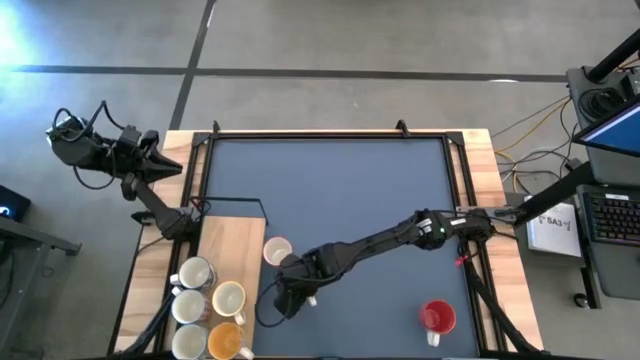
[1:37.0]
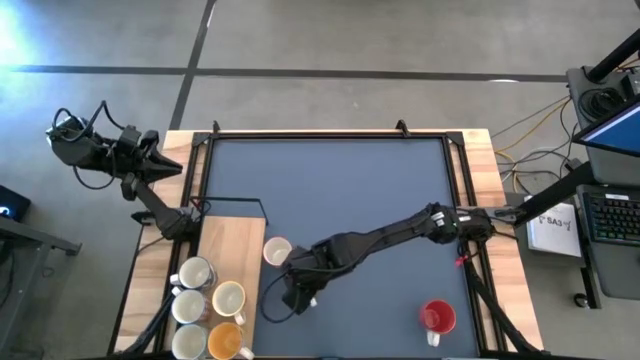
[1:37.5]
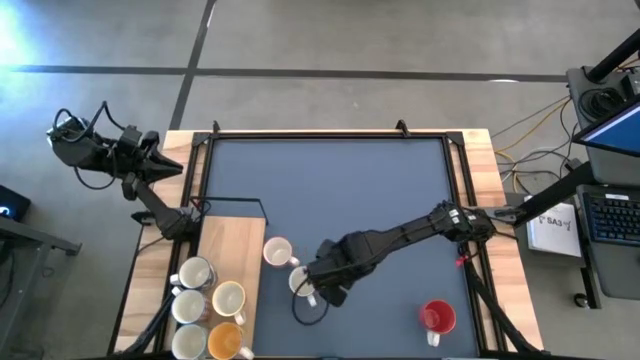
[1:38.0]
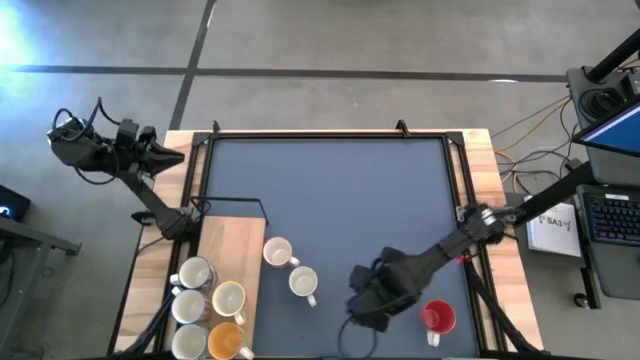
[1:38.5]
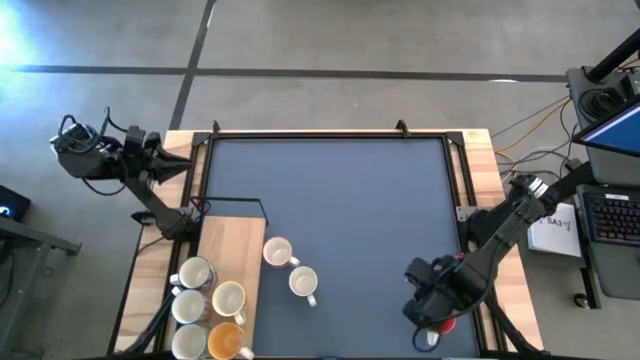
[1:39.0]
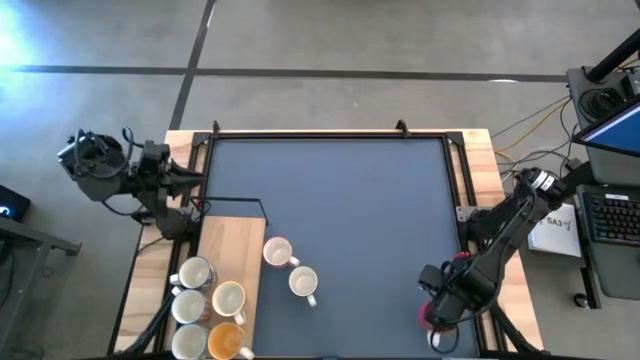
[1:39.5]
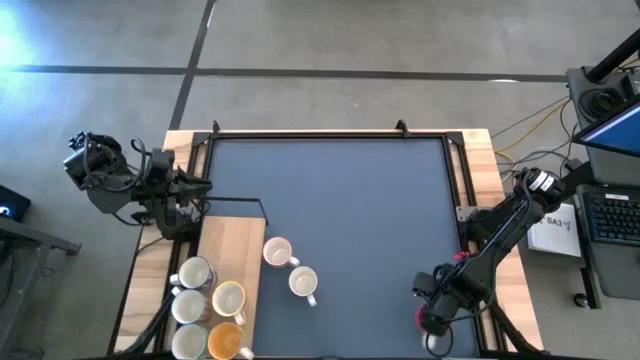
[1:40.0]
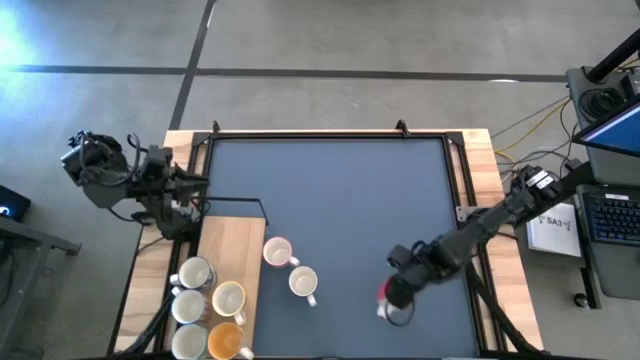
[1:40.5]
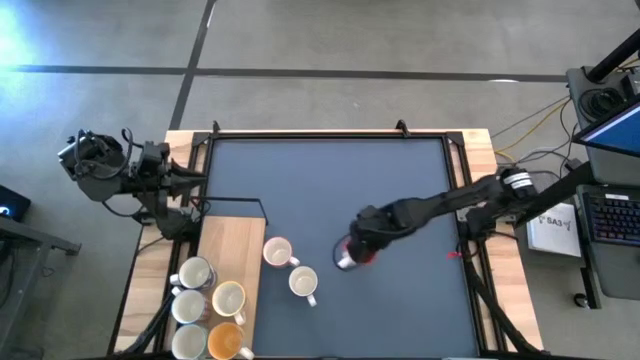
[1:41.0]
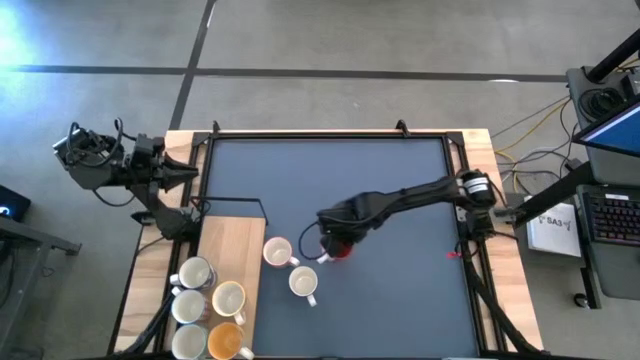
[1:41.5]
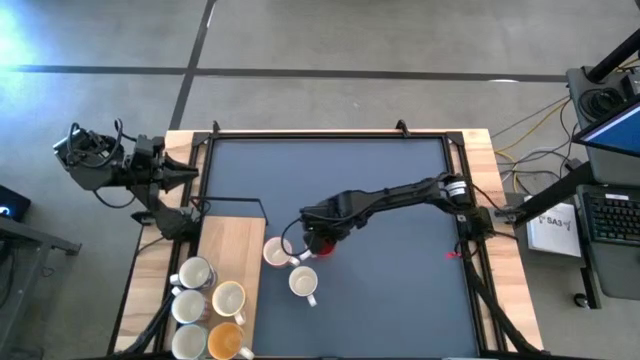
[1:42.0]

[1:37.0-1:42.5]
Task: Place coffee mugs
Move the orange mug to the center of the table

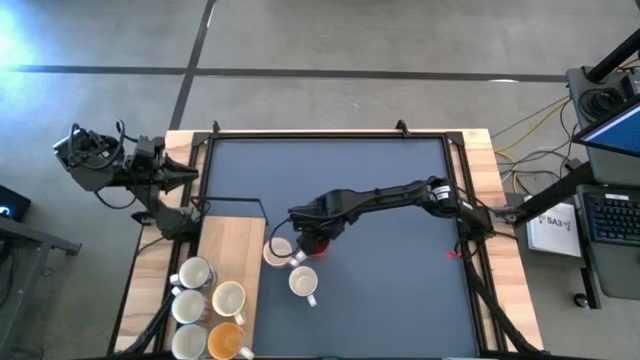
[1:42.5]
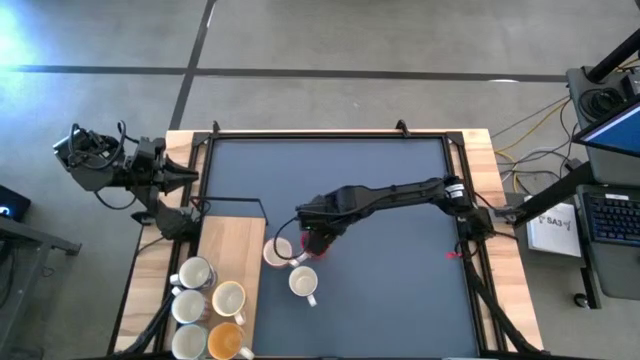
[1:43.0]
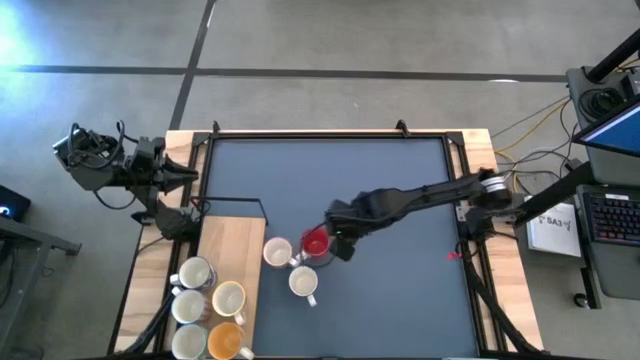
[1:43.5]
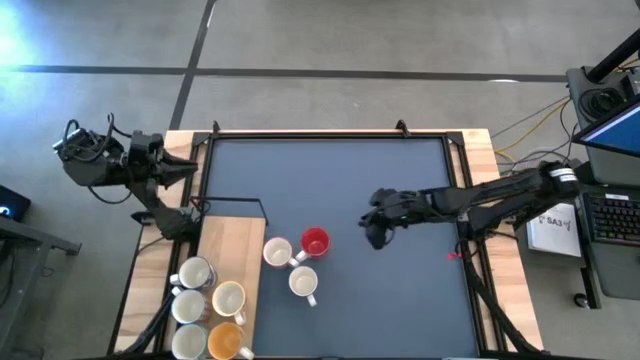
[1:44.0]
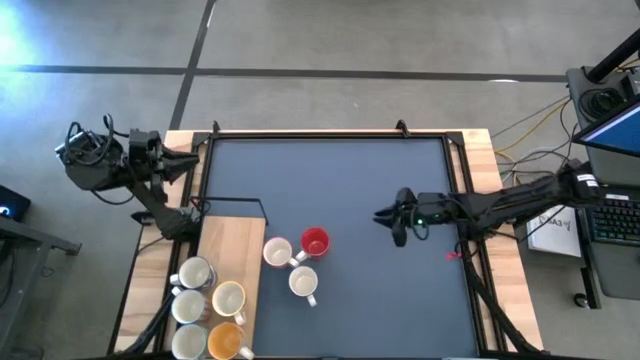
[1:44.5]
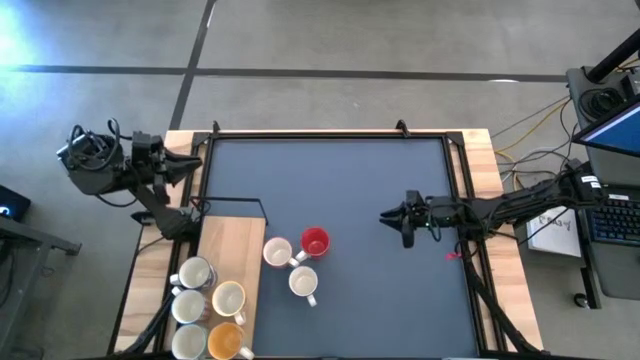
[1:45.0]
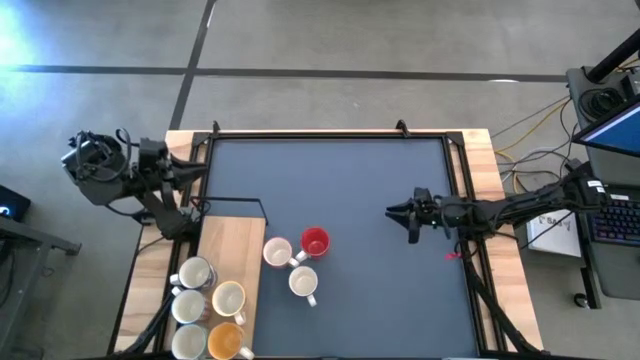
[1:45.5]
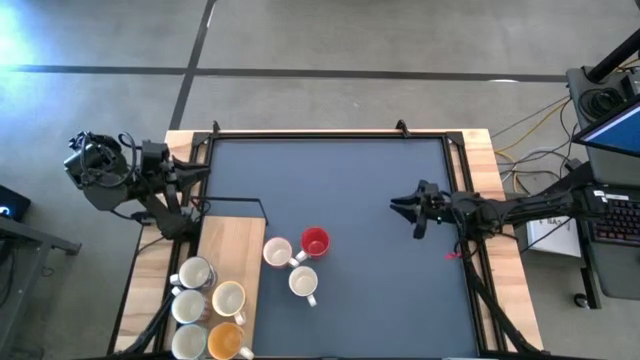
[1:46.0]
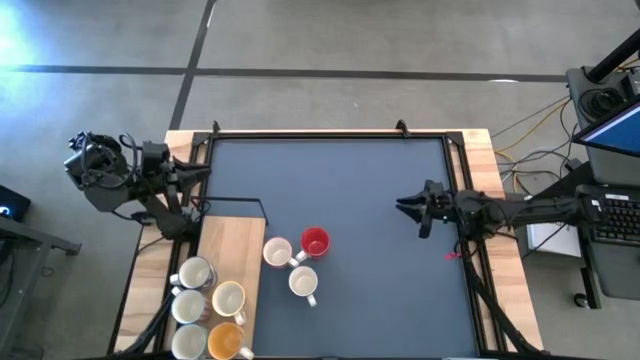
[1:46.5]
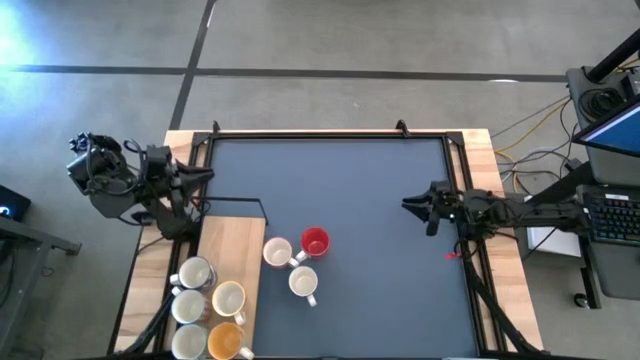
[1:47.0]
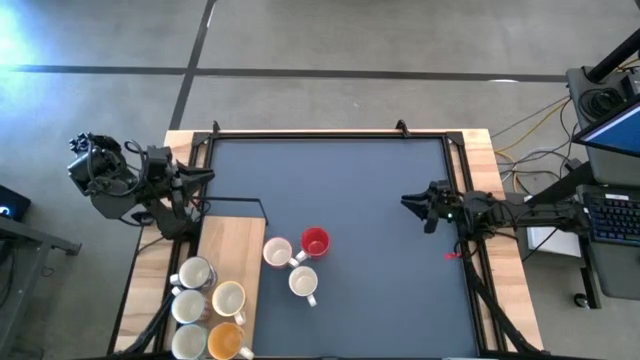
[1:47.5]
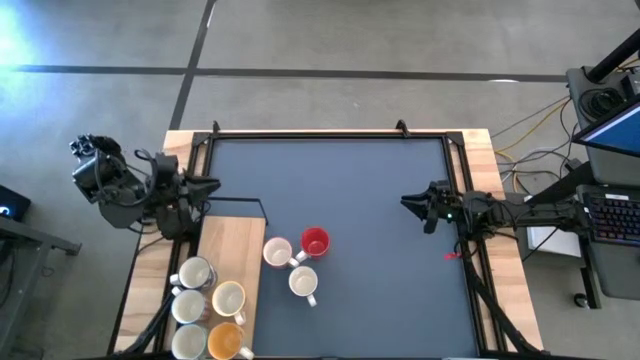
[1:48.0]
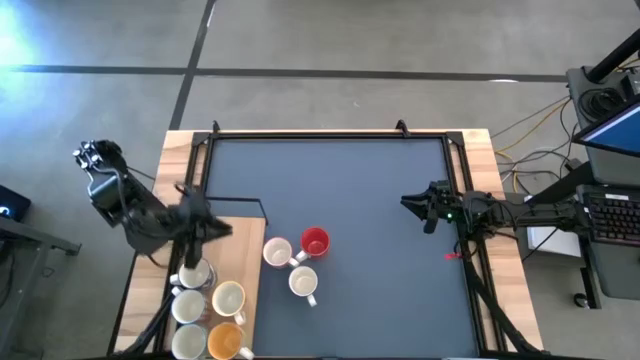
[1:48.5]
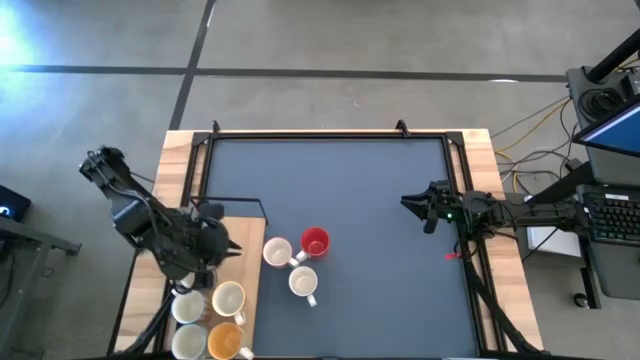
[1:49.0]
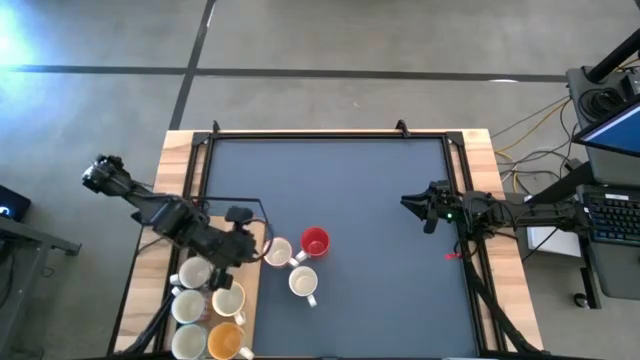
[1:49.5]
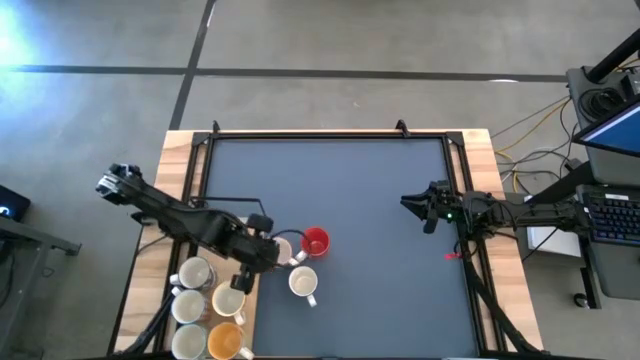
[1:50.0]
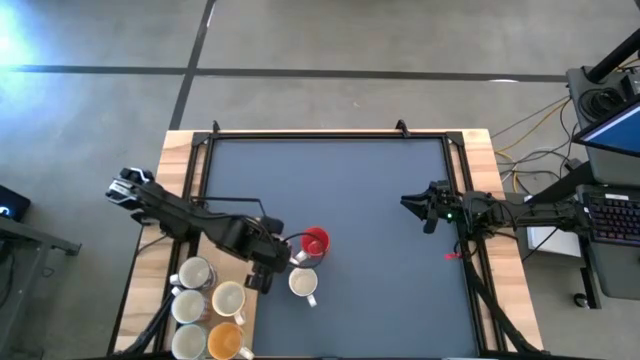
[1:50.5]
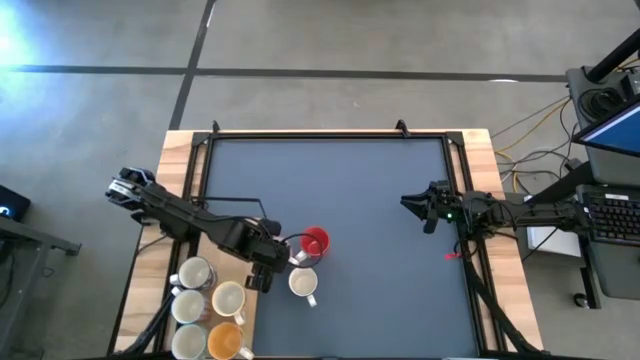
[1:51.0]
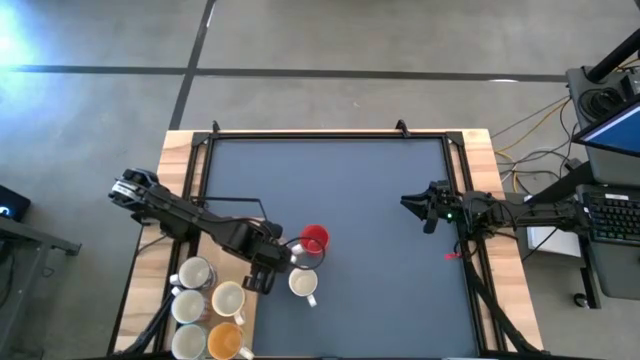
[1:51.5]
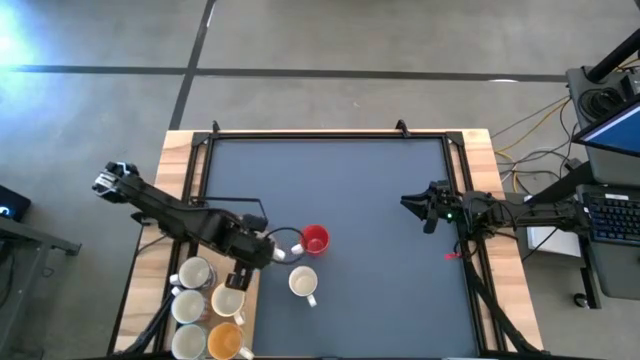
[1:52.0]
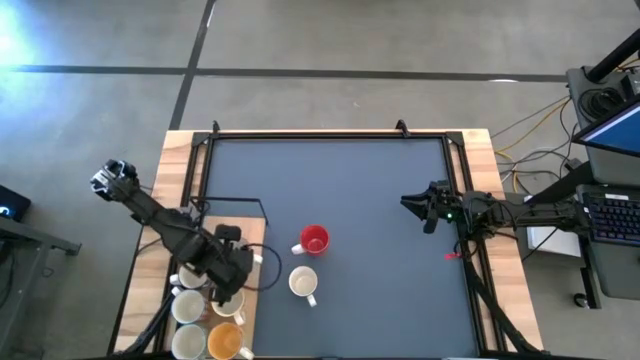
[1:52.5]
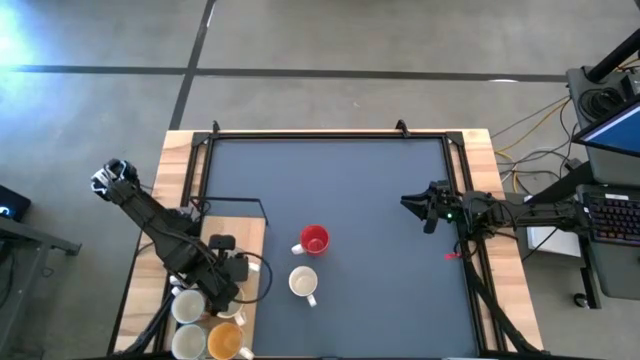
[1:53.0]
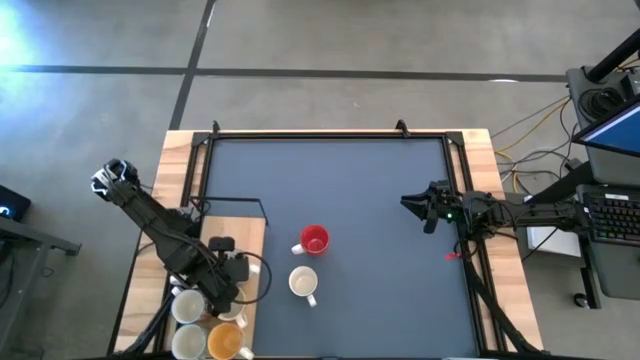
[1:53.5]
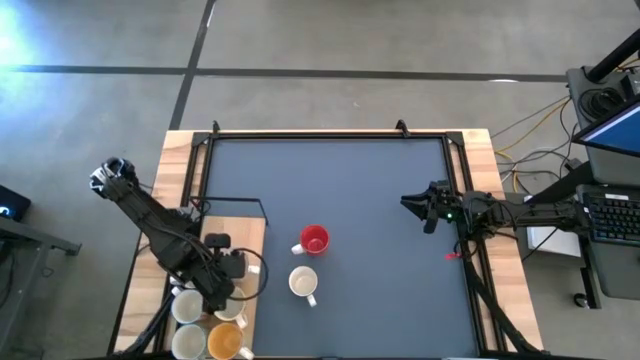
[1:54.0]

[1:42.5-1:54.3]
Put the patterned gray mug on the shelf

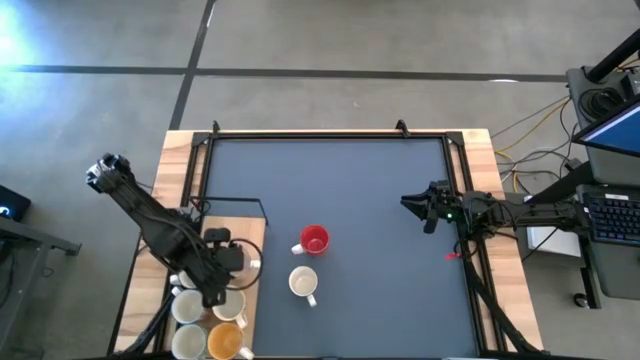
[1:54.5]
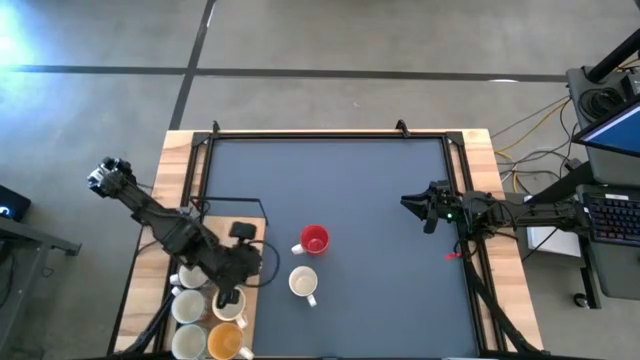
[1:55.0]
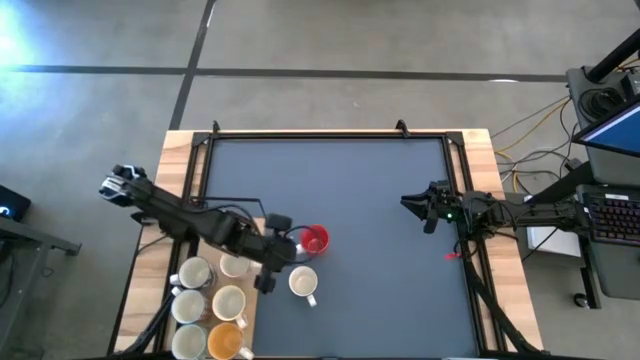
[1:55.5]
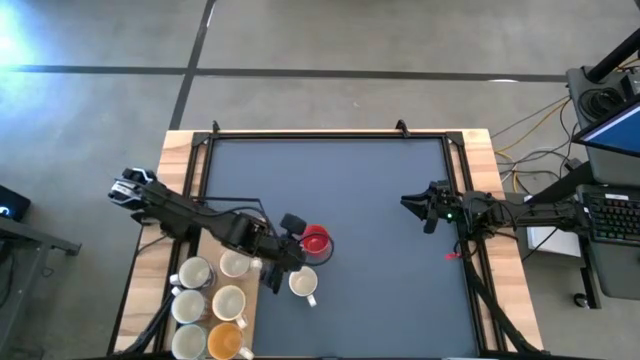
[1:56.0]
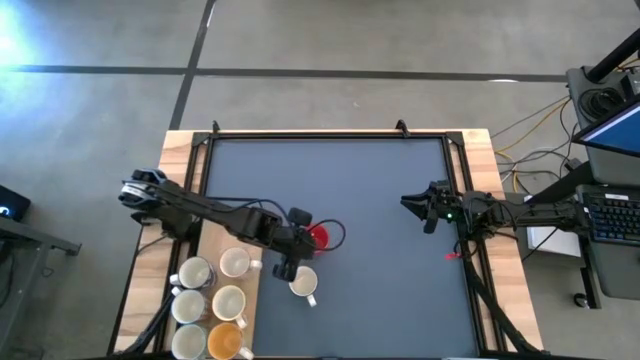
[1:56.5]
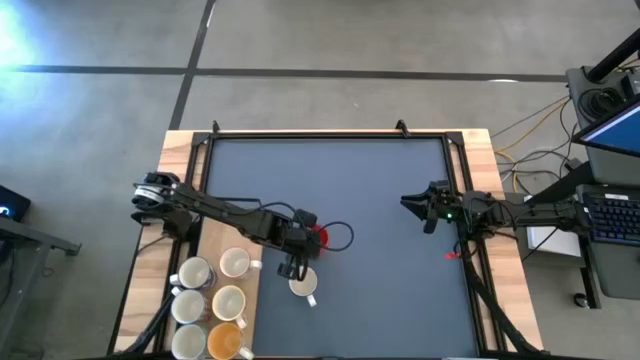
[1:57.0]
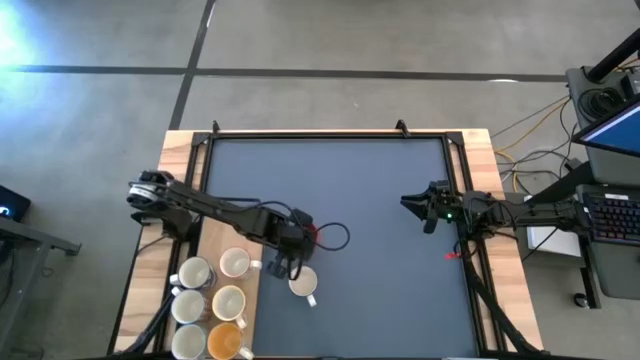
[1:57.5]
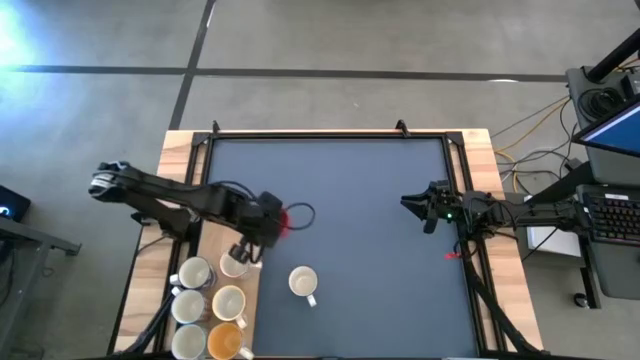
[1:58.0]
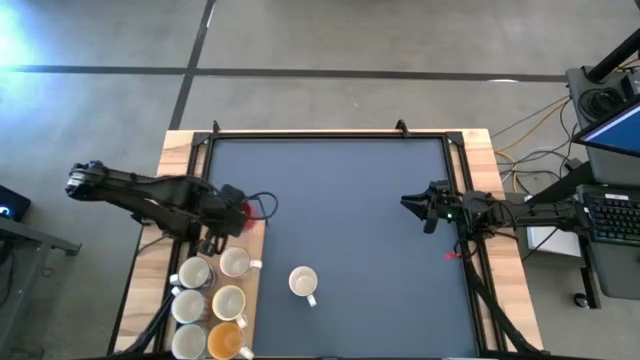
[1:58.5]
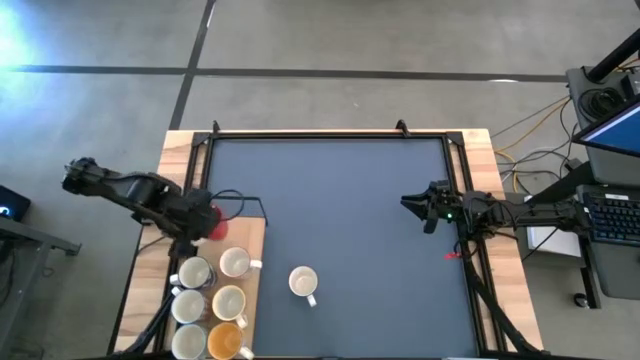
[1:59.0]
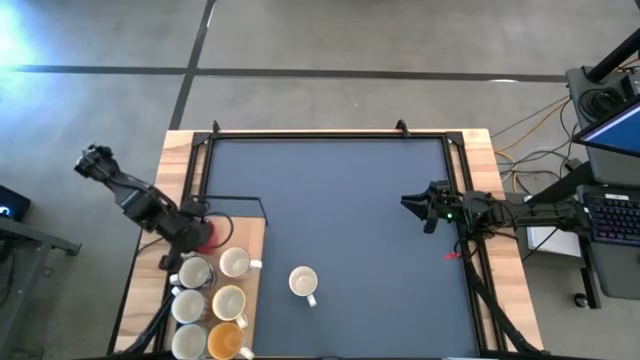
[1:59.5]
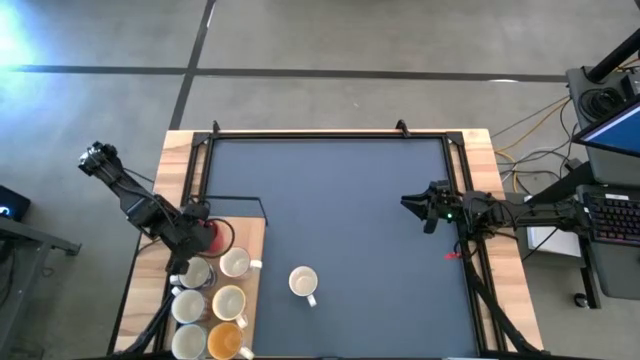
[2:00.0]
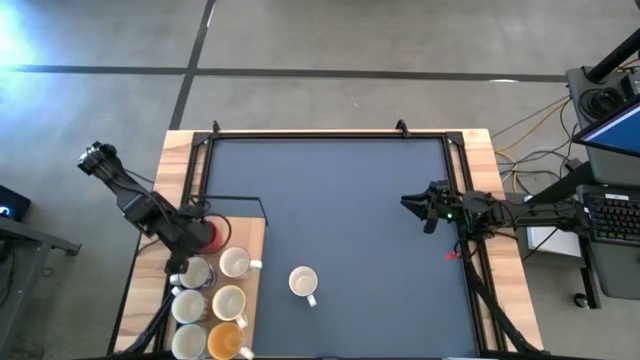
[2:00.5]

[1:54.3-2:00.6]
Put the orange mug on the shelf
